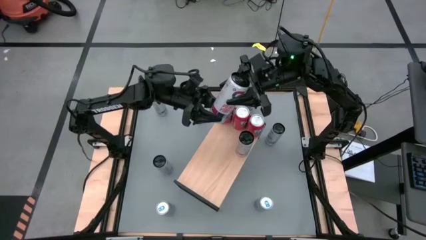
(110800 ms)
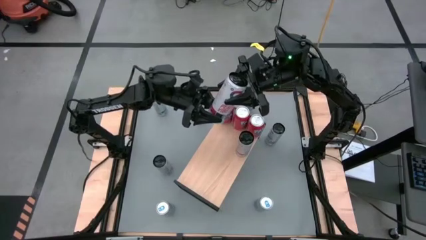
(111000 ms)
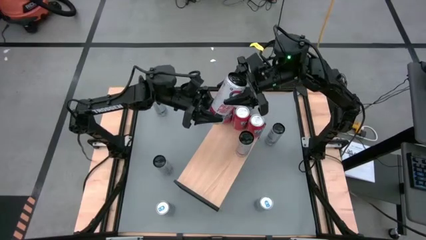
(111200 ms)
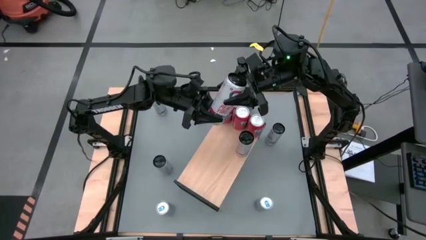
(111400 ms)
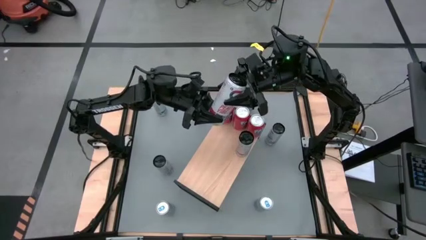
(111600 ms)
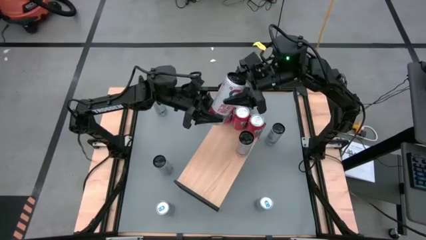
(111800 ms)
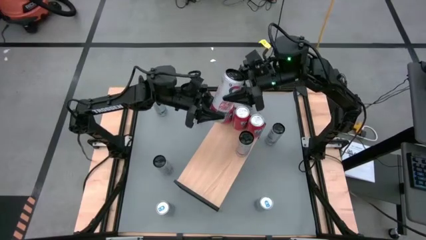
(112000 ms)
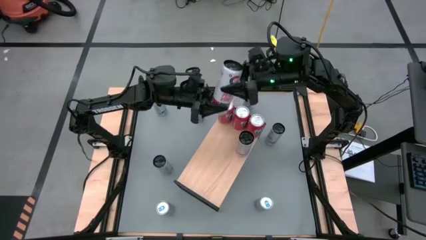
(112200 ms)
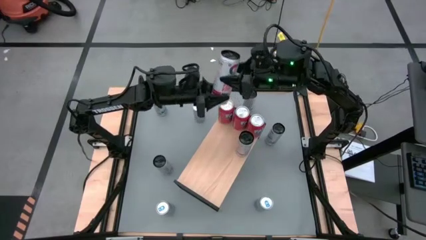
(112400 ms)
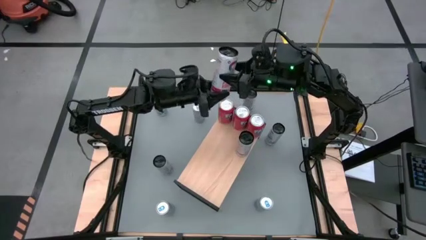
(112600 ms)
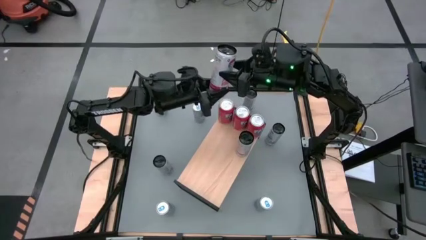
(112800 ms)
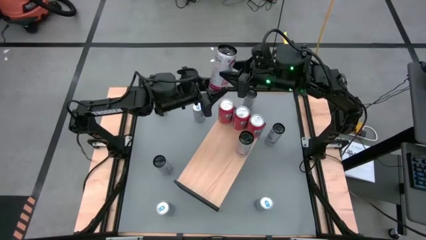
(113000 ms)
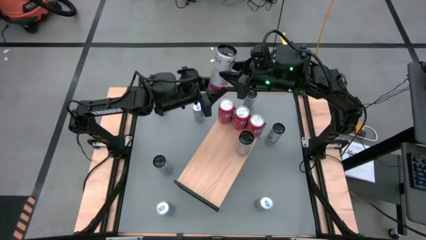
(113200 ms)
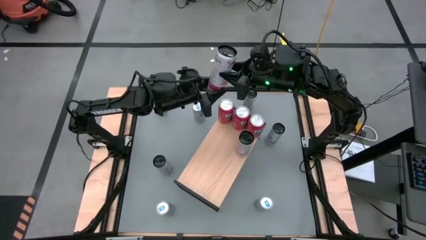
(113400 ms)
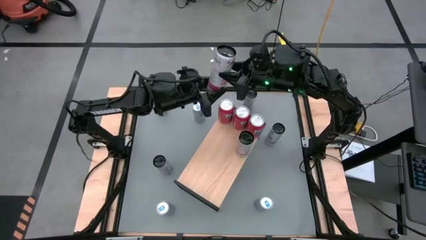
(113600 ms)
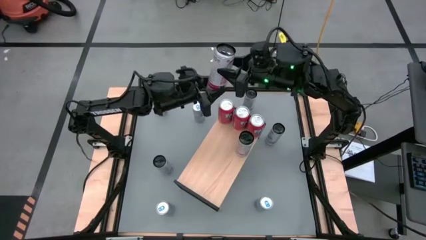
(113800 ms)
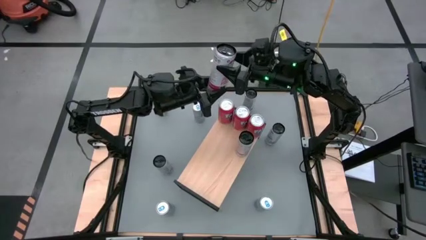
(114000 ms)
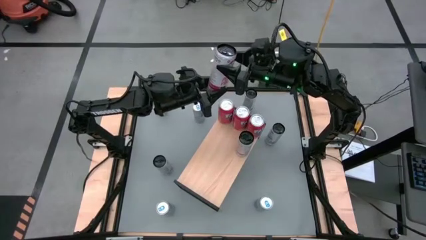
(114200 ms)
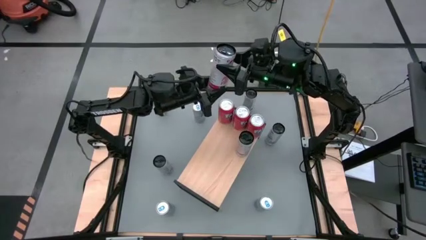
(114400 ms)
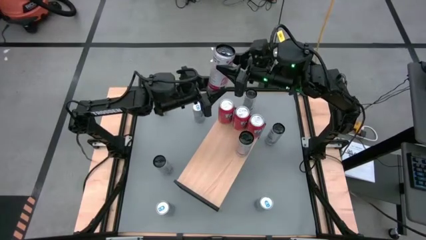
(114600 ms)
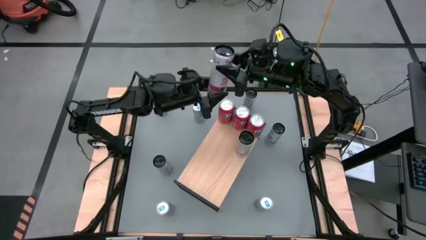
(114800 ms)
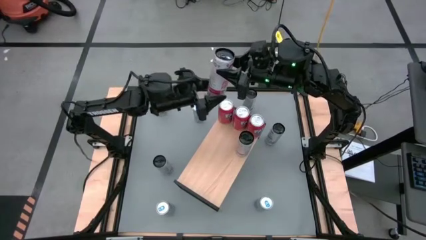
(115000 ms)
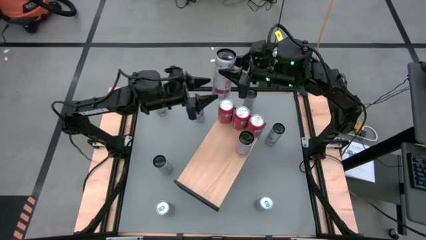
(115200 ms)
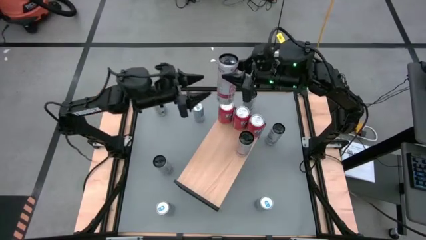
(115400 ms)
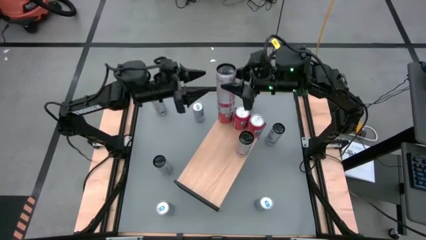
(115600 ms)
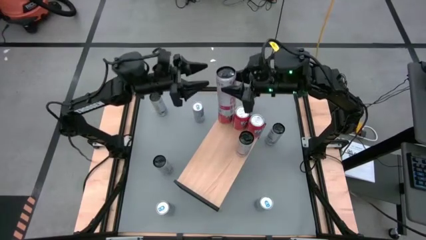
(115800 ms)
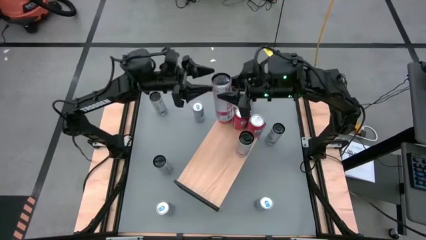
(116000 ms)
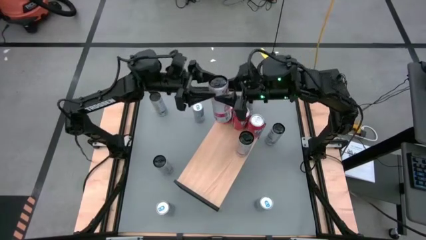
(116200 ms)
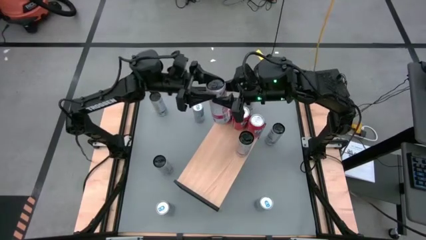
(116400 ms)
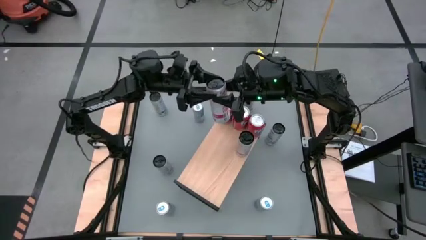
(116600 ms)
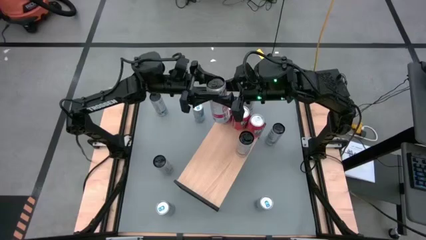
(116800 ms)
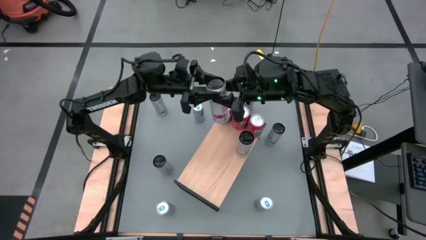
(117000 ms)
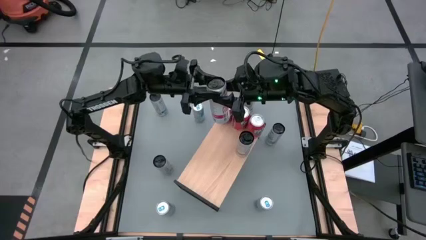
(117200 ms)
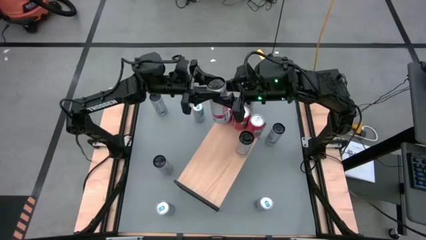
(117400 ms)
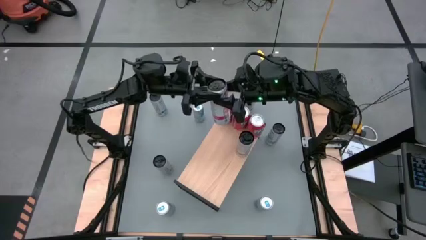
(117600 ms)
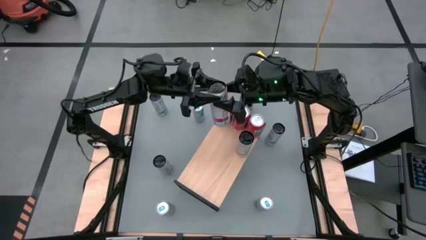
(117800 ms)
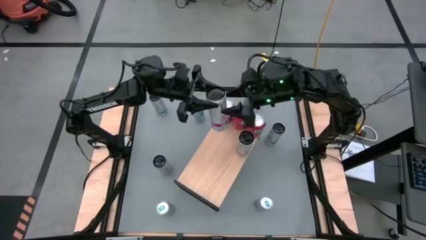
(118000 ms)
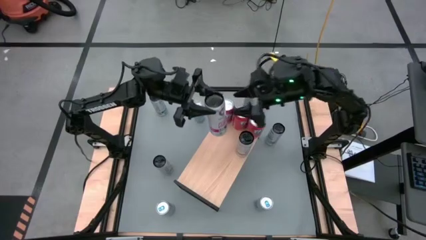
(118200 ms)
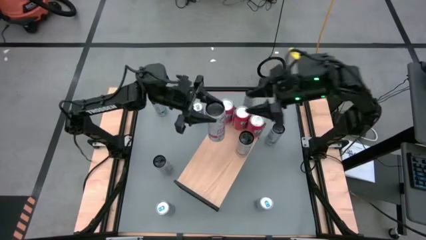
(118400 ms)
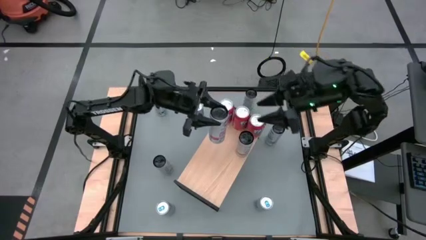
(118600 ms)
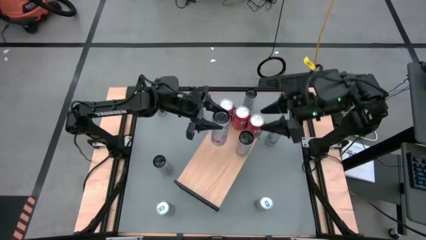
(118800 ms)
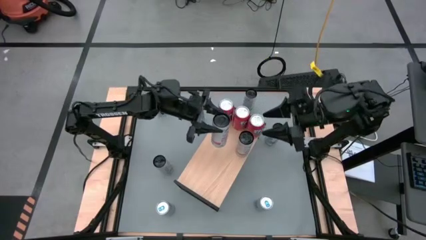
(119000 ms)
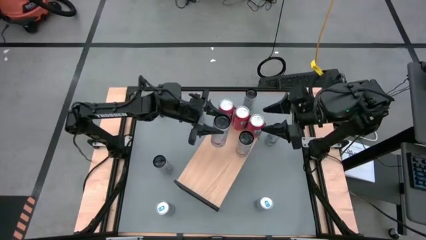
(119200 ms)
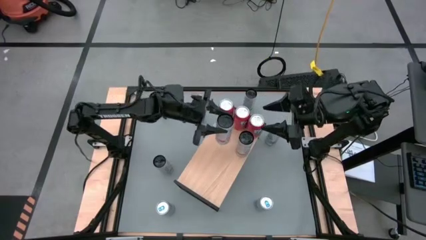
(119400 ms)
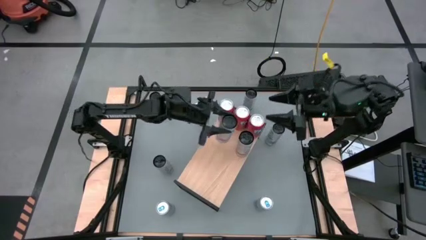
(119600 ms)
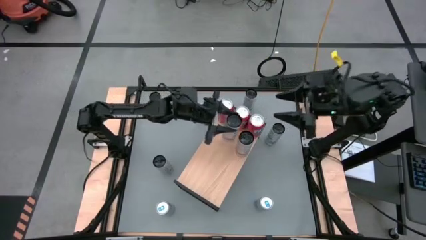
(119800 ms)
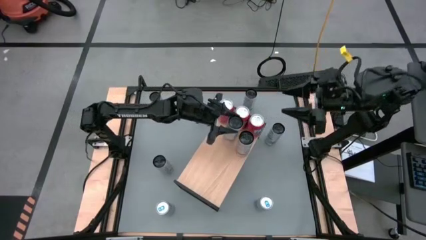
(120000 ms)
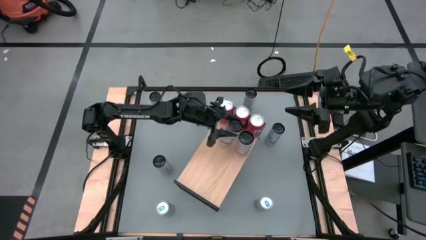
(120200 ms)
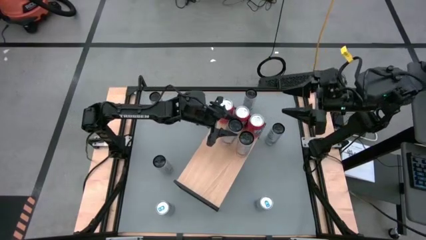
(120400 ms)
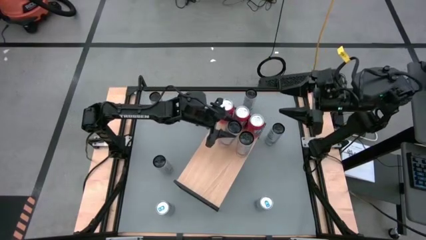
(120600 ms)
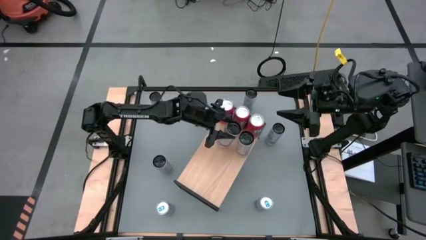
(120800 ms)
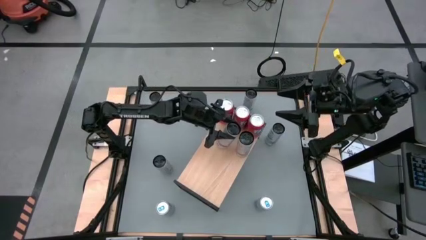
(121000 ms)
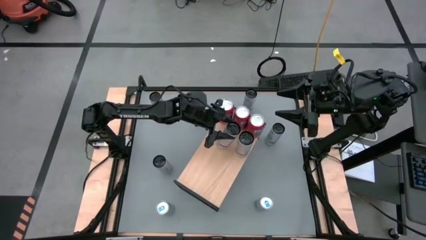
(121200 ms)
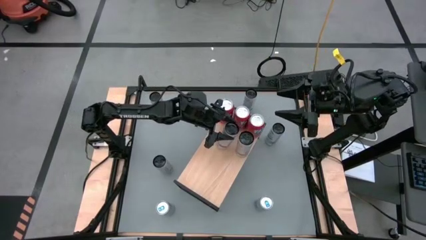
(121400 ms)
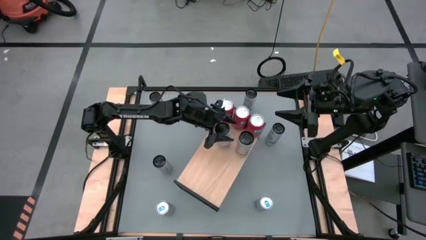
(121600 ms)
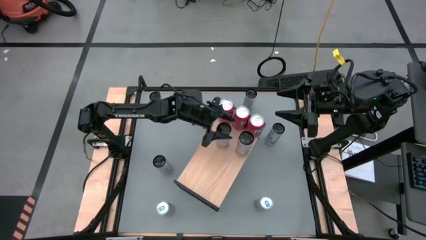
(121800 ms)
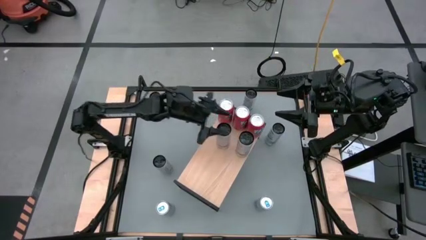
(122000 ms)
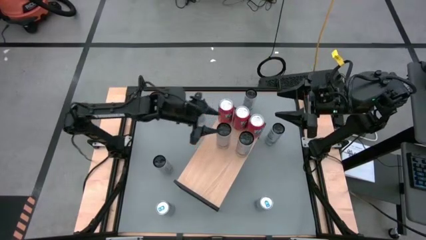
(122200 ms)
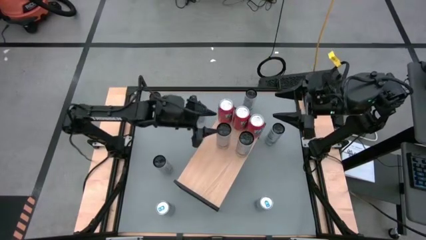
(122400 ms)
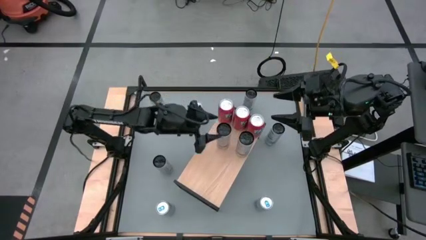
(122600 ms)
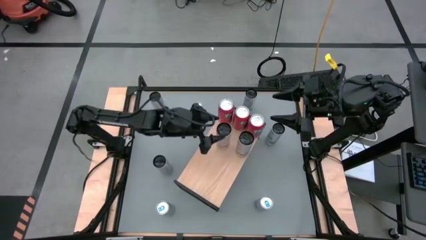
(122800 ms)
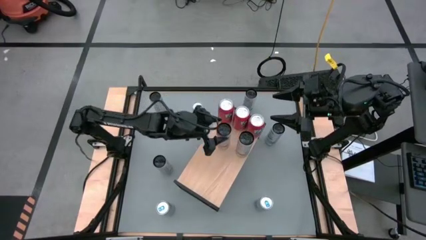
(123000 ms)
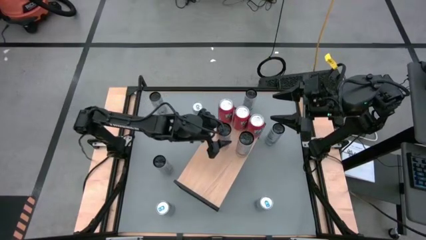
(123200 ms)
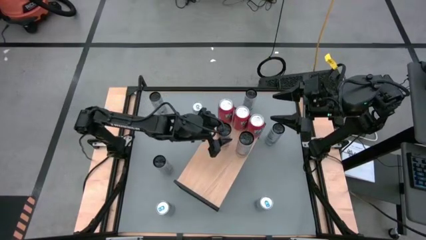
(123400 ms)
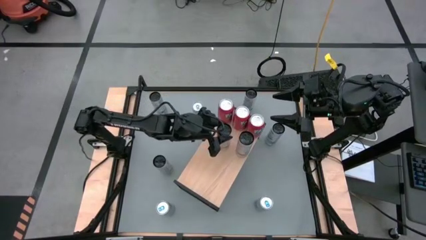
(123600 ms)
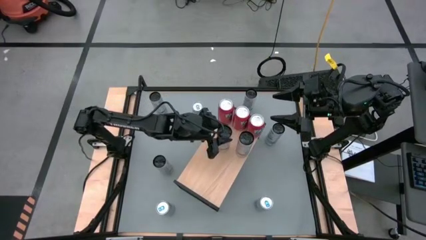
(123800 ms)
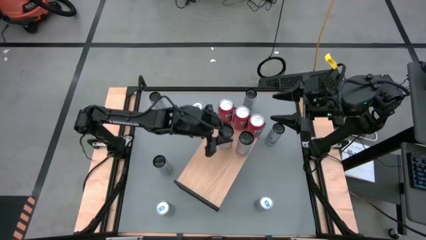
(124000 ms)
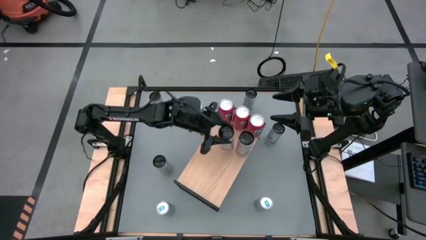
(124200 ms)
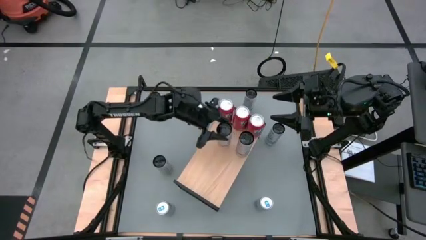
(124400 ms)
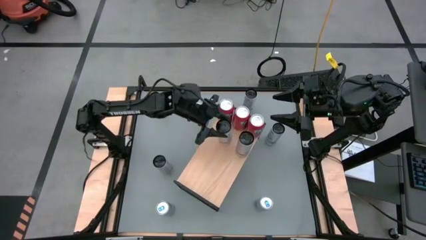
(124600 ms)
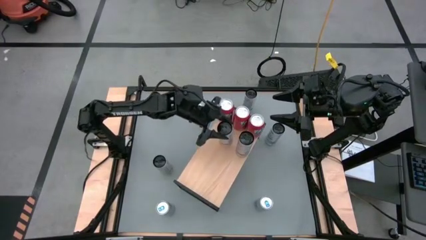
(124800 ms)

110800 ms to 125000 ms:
Task: Place canned beverage on shelf
Put the white pink soda can on the shelf aligned with the other white pink soda can

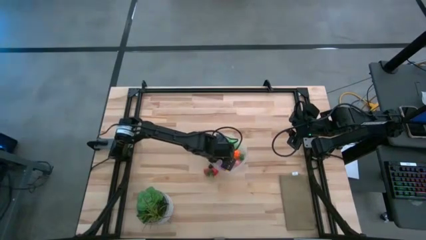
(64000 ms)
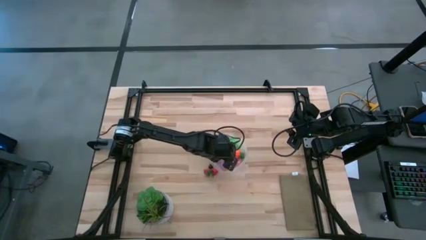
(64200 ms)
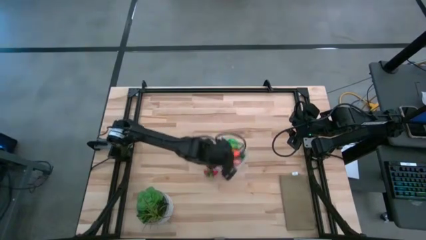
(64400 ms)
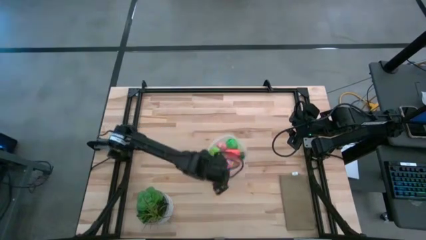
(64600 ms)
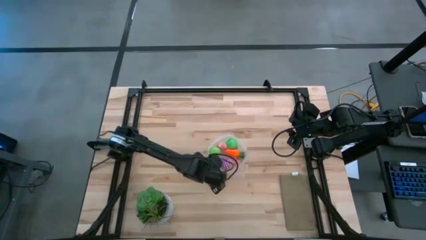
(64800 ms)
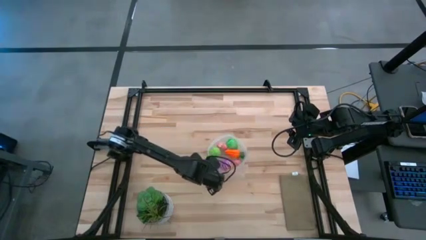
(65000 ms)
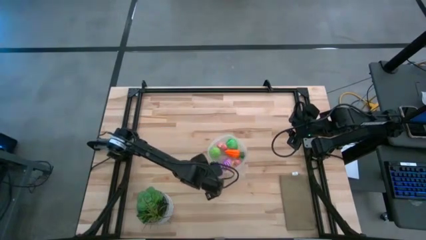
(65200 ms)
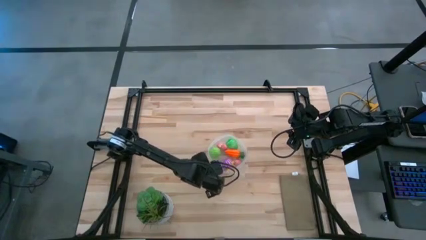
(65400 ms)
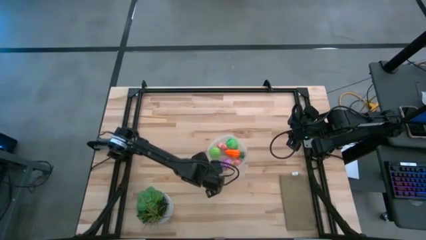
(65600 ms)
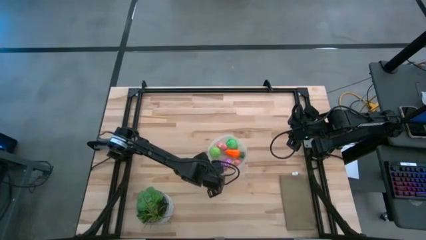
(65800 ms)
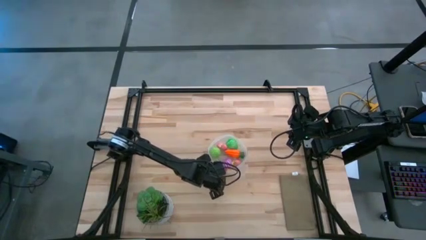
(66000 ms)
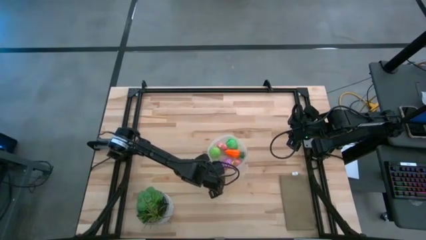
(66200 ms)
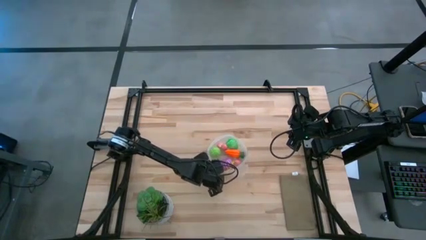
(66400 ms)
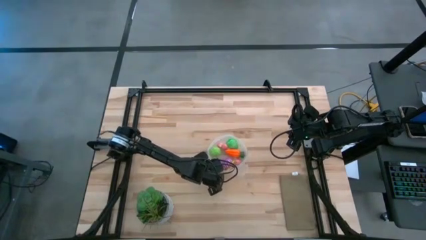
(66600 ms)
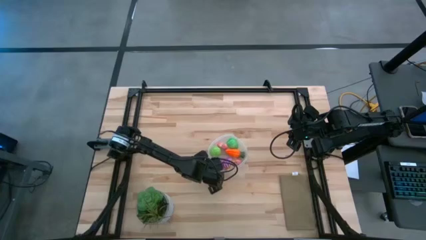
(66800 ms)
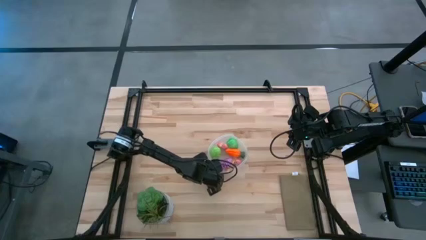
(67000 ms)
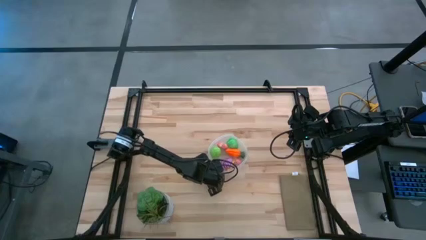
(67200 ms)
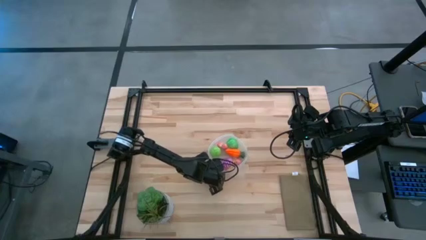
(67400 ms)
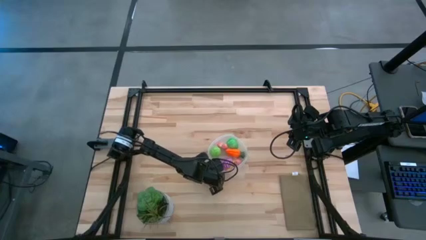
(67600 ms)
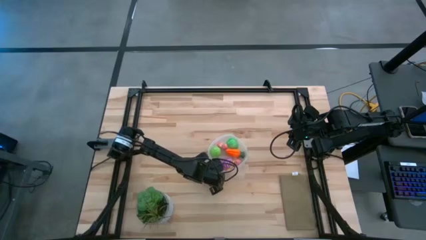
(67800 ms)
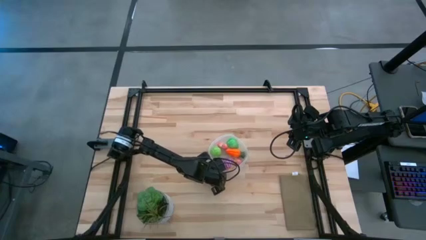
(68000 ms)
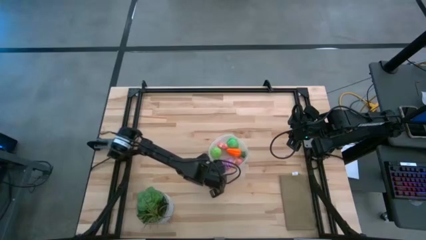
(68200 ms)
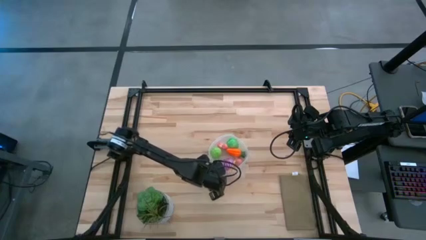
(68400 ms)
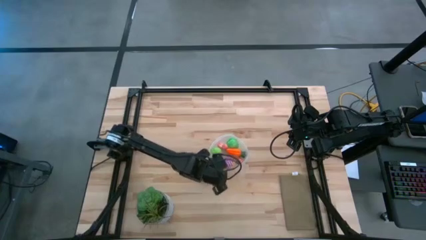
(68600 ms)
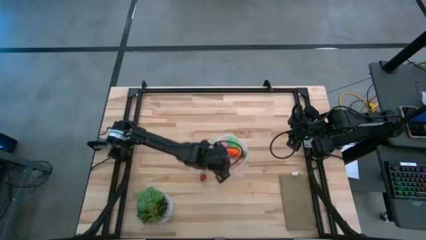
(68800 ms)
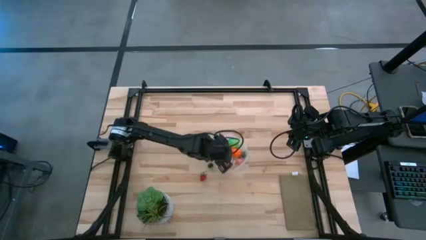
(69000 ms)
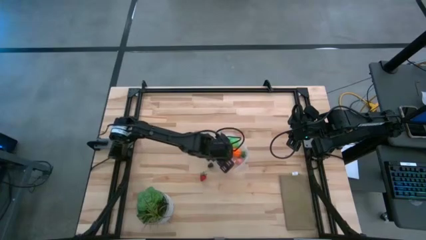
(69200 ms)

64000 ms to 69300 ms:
Task: Pick and placing Produce into tupperware
Put the right red strawberry into the transparent bin
